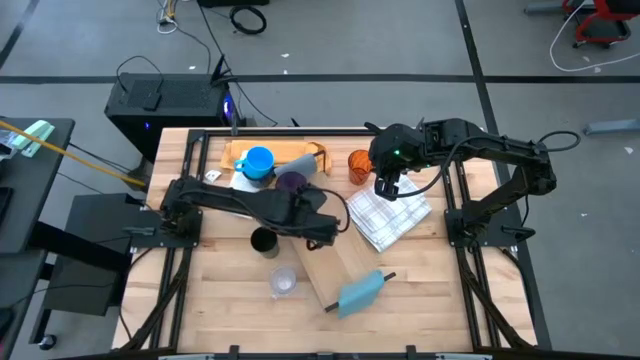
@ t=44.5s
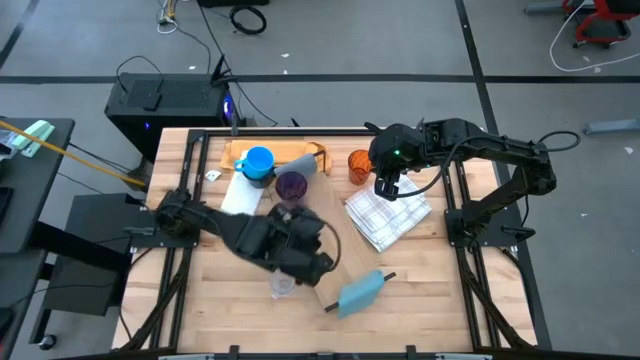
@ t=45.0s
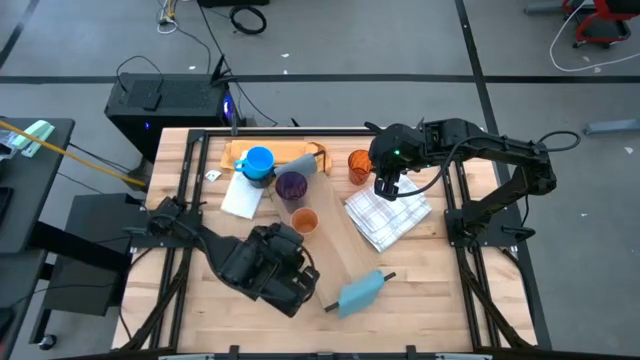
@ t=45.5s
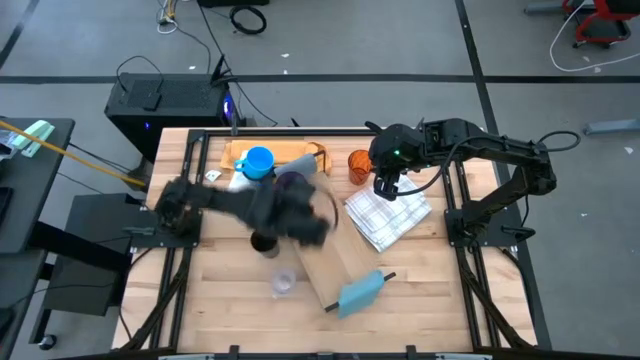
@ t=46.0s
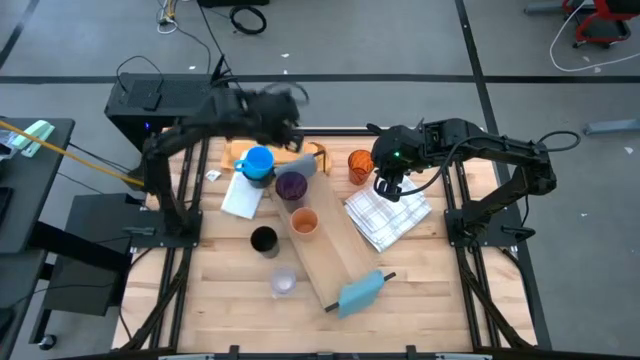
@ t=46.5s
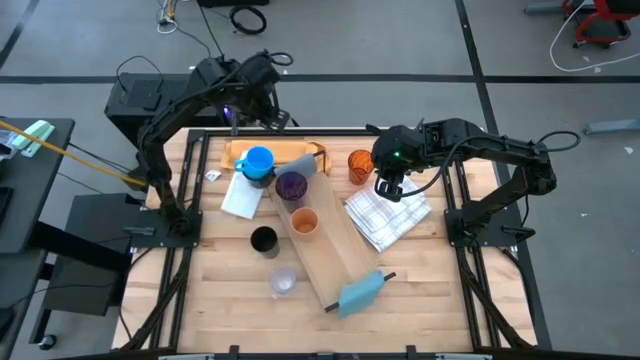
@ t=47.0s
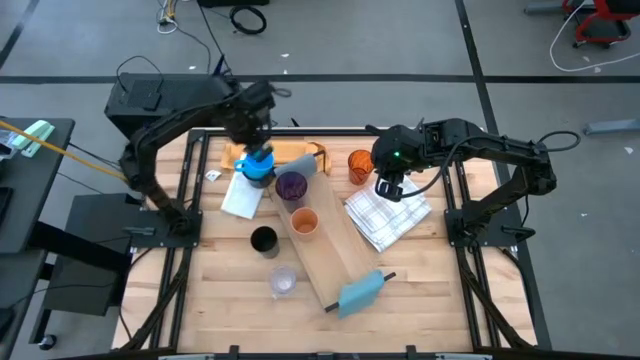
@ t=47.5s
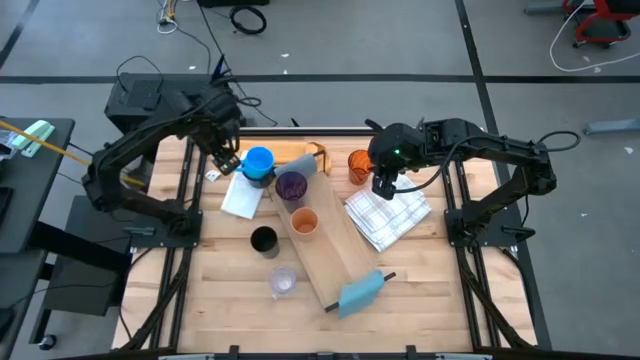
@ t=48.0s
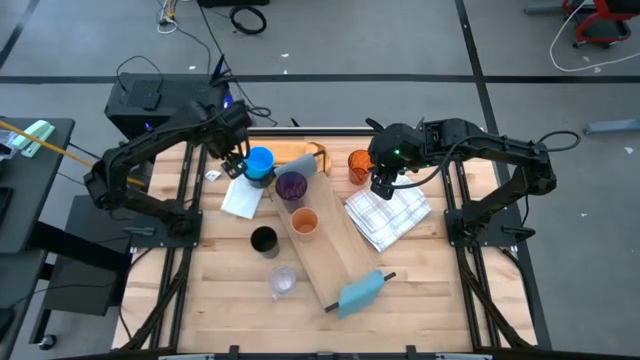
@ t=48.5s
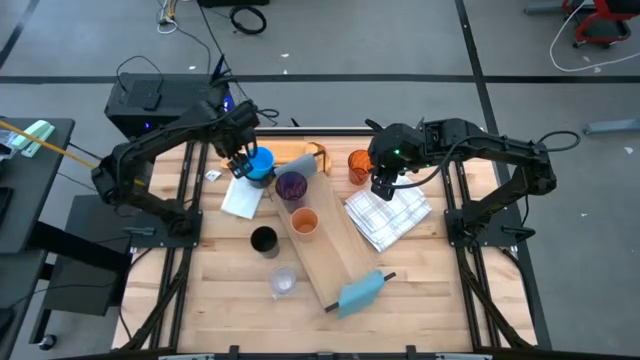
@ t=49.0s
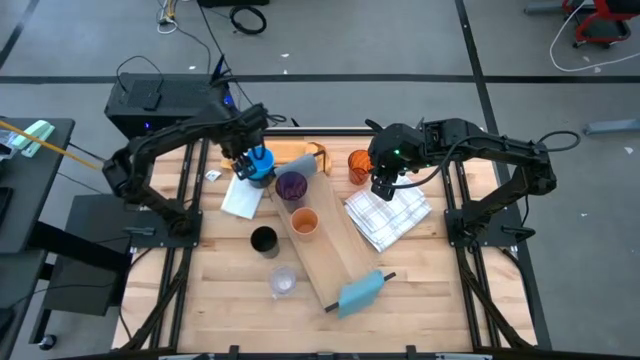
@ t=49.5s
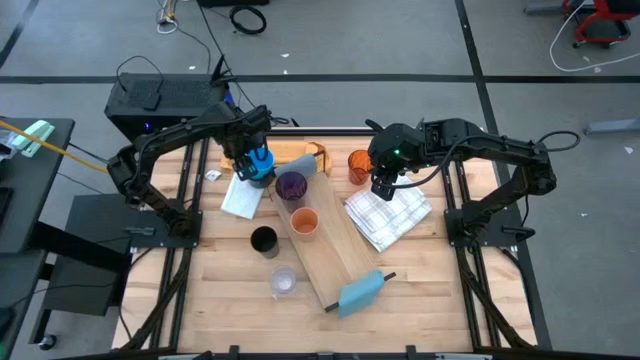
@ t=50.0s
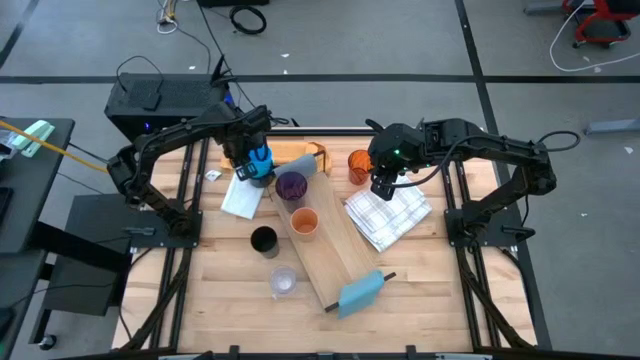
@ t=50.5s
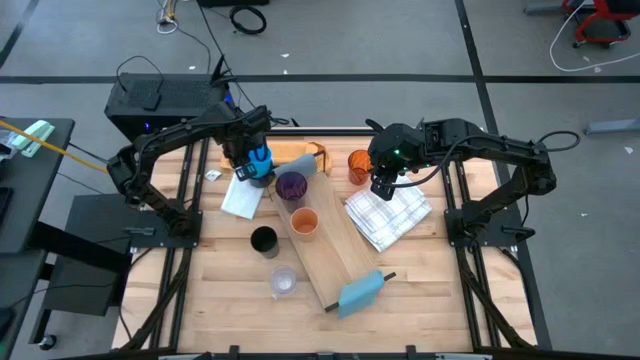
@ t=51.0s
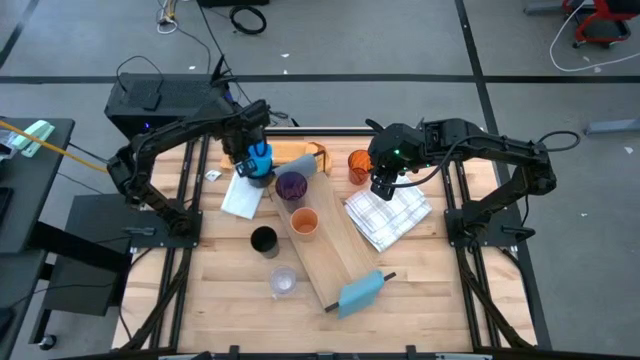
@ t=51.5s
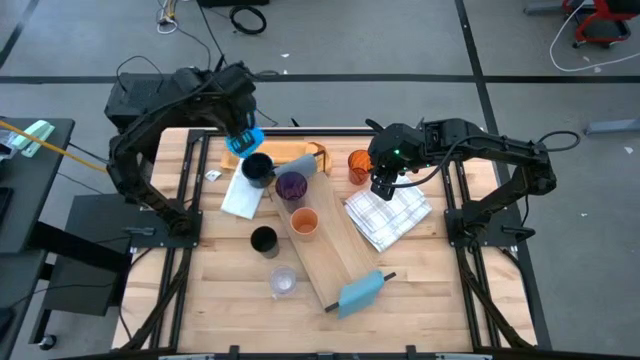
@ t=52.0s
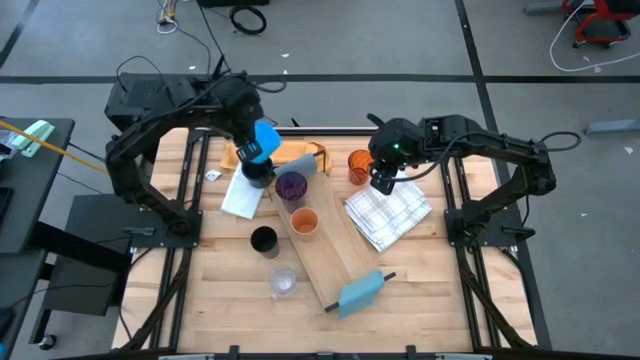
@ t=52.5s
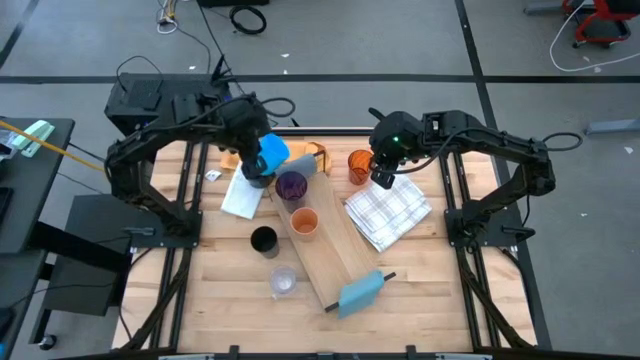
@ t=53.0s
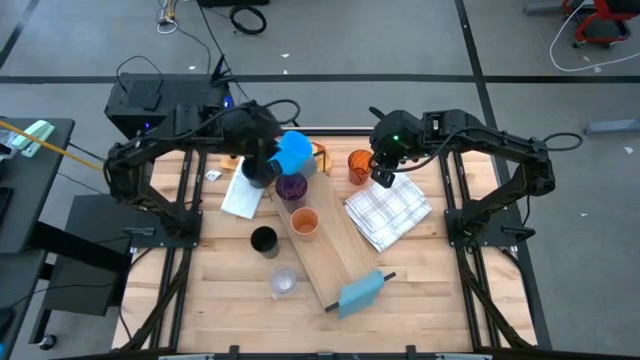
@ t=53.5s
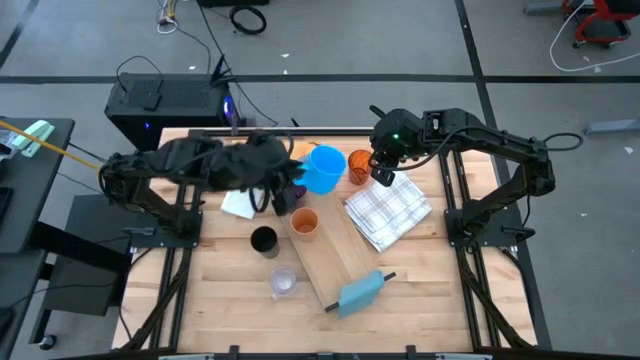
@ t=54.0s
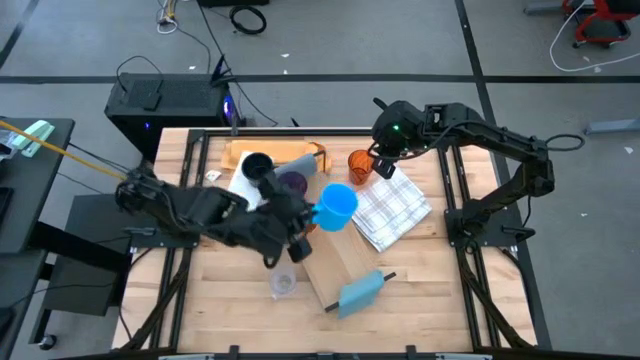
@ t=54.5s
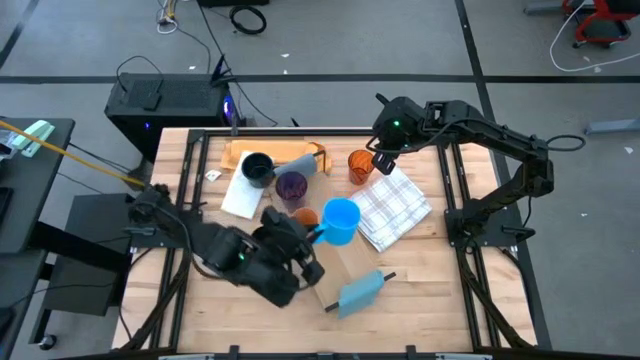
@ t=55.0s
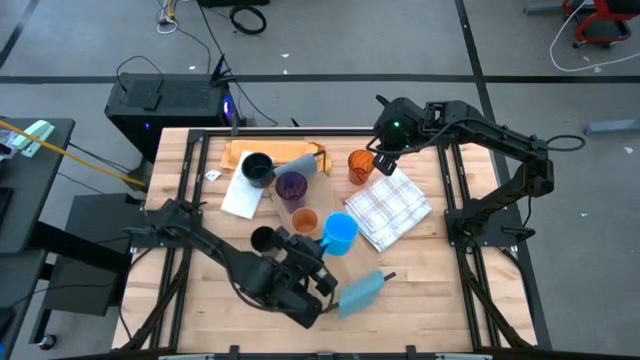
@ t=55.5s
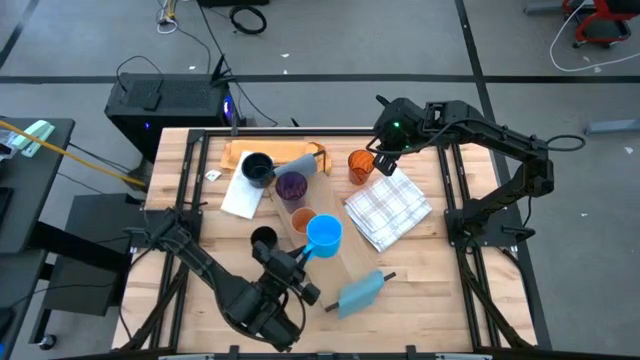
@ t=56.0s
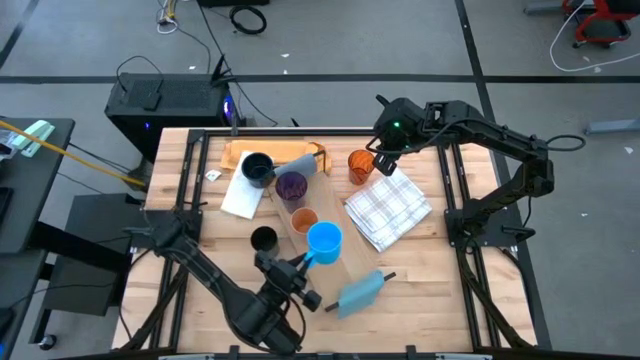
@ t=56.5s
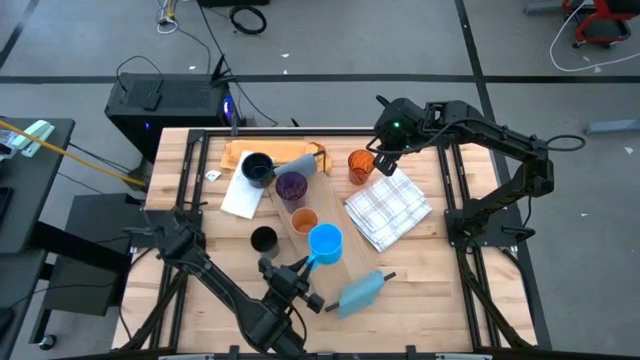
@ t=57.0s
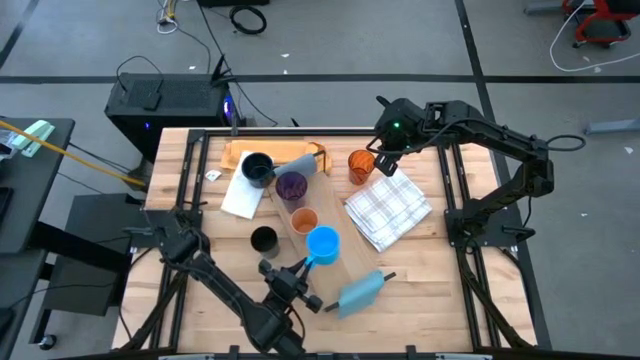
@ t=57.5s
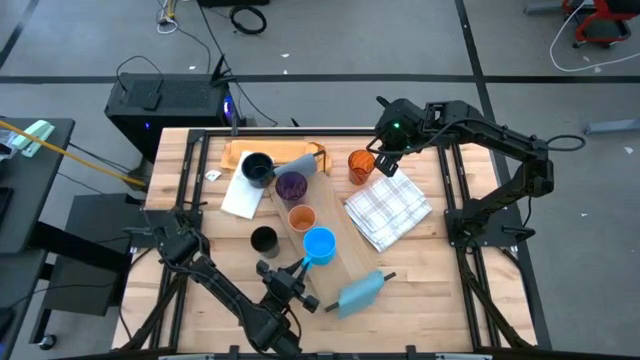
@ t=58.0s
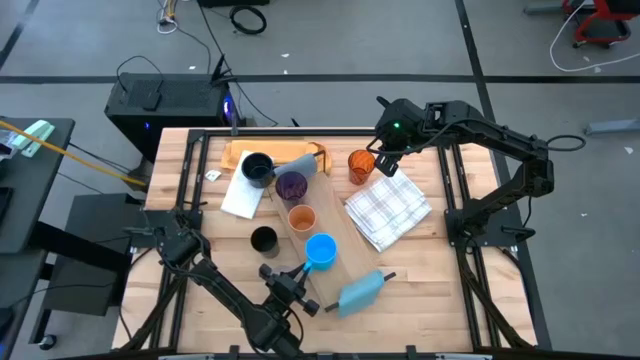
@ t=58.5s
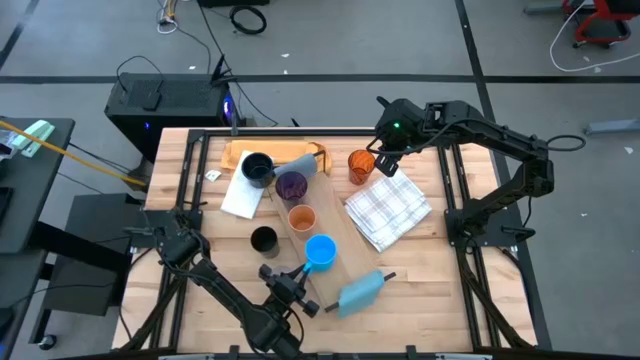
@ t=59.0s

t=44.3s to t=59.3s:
Task: Stack small to large cups/mugs on shelf
Put the light blue mug on the shelf

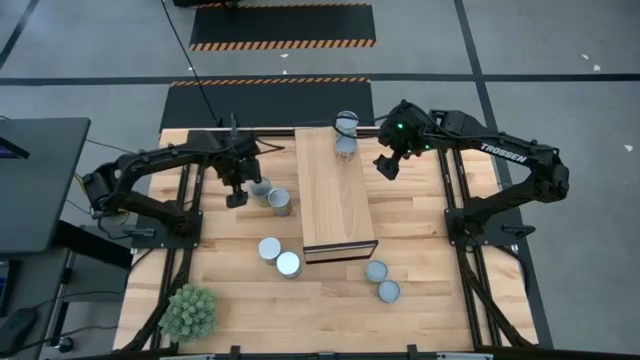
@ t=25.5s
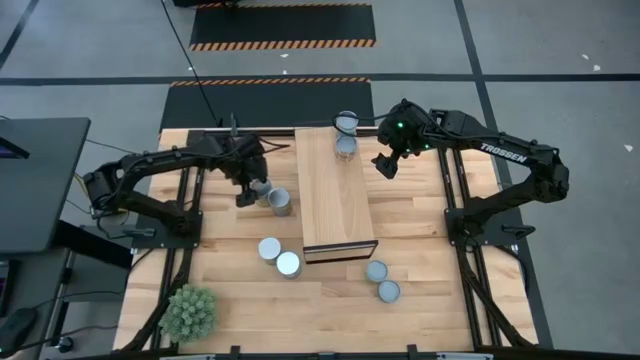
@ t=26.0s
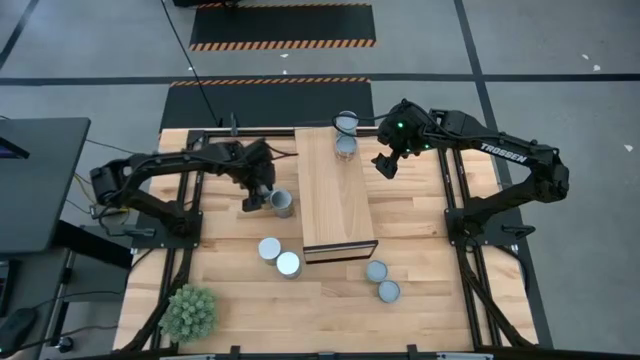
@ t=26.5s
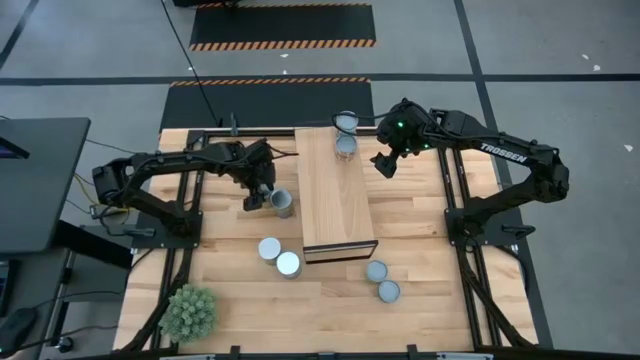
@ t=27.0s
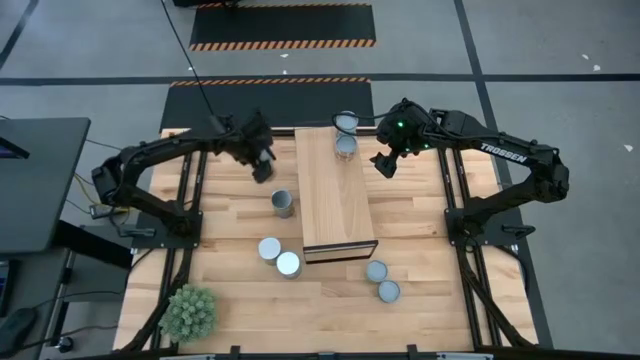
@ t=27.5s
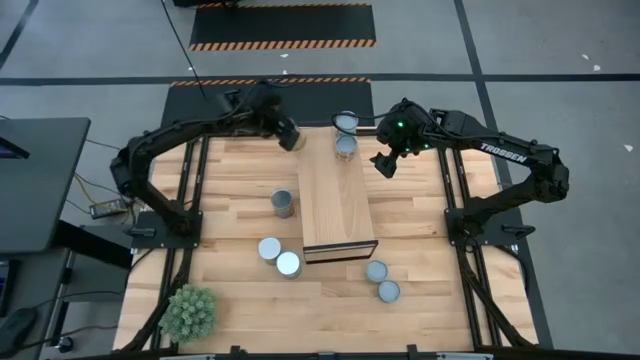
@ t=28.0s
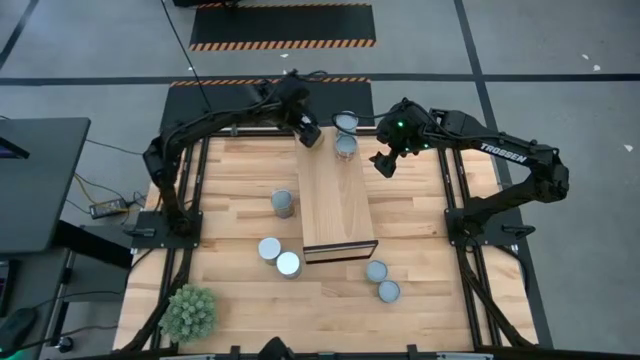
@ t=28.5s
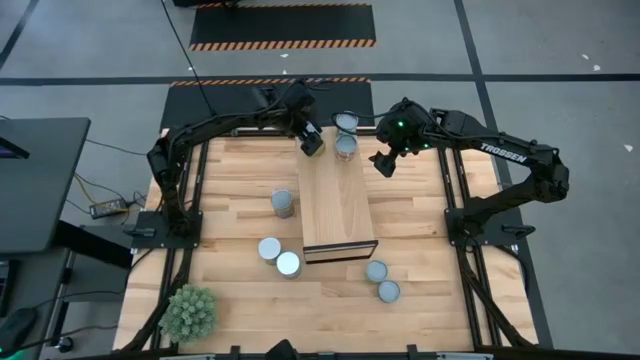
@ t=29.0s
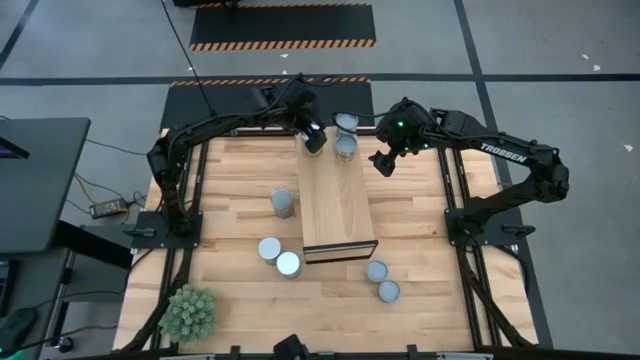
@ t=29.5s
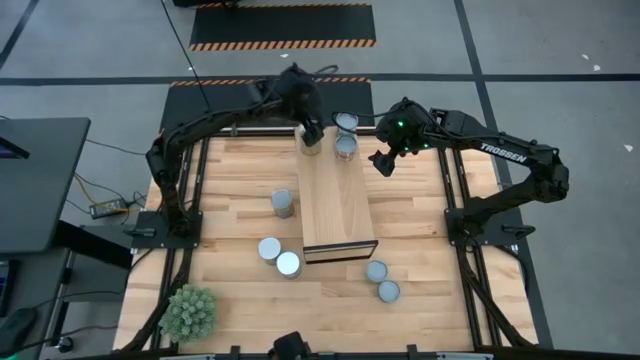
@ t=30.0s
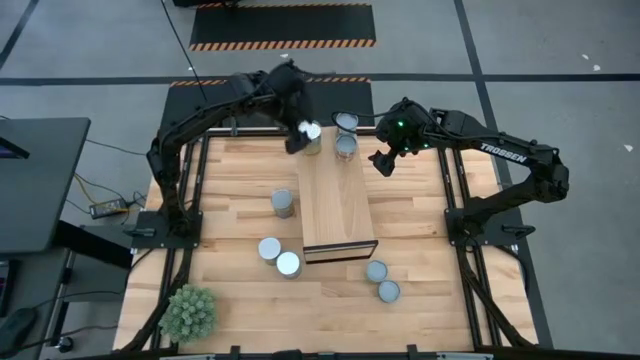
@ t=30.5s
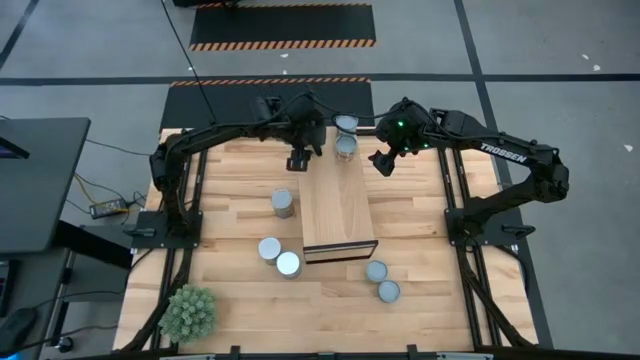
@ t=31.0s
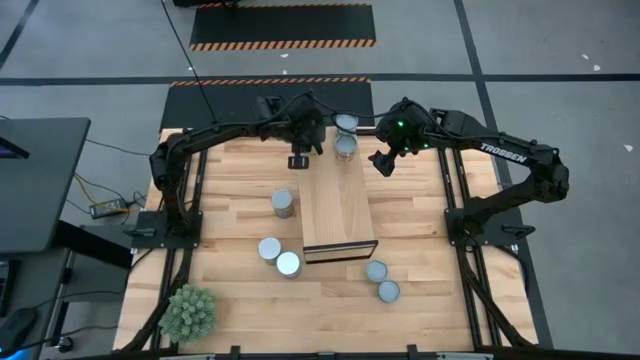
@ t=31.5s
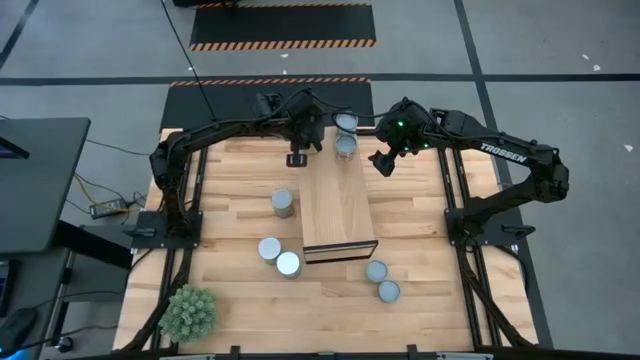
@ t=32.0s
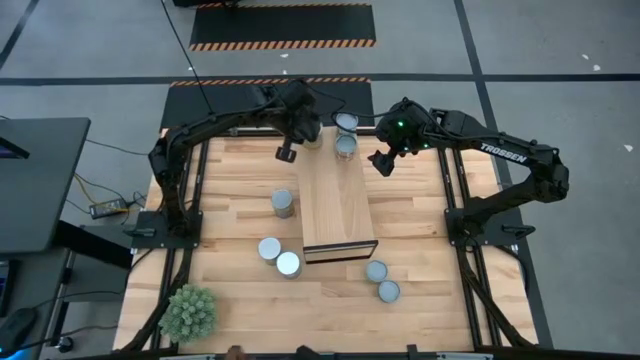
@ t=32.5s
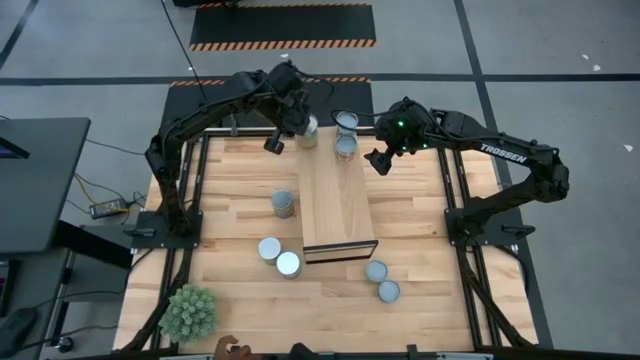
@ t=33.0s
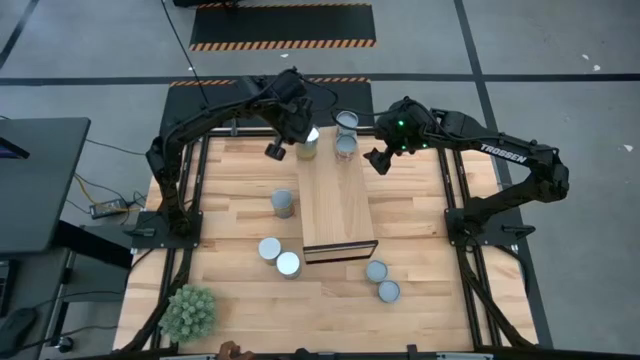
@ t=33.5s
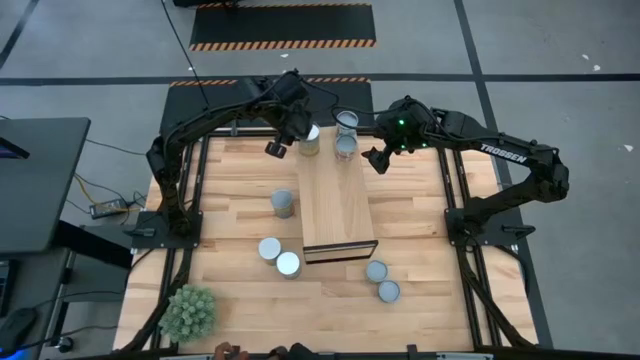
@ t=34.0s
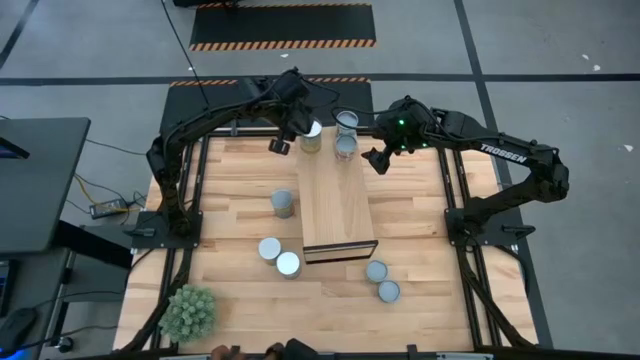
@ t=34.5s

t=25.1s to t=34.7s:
Task: Pick and place cans onto a shelf
Put the canned carrots on the shelf
